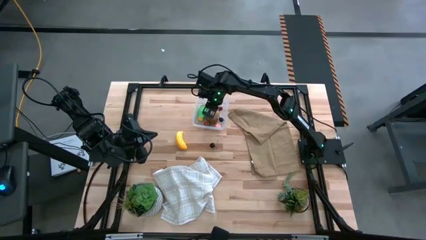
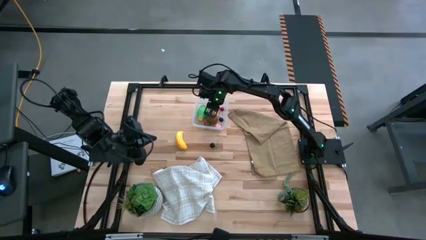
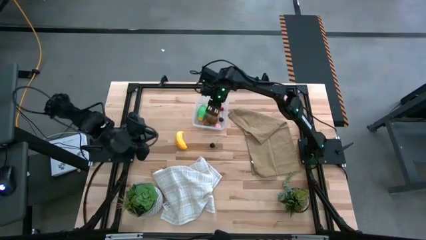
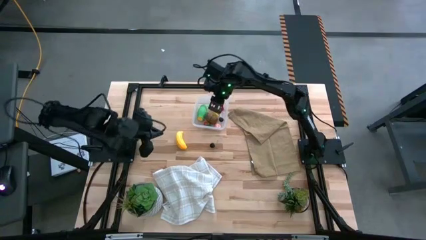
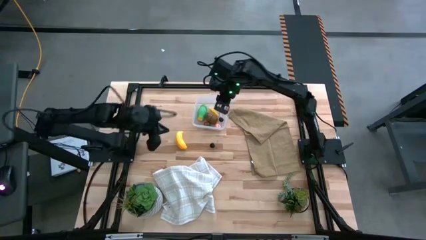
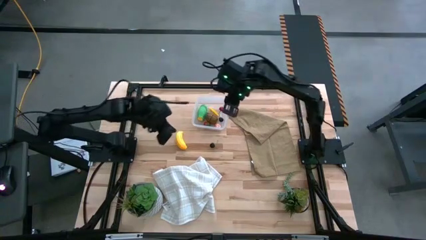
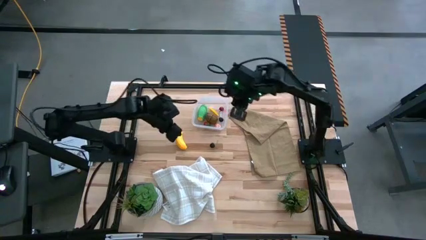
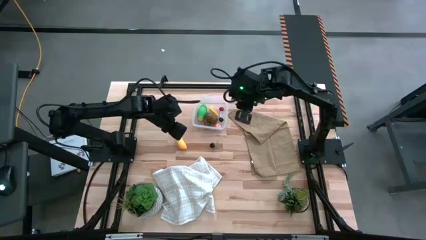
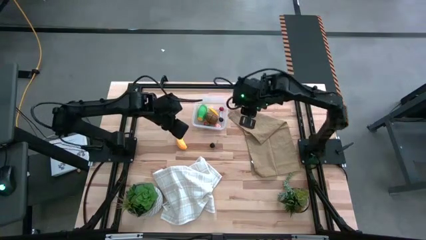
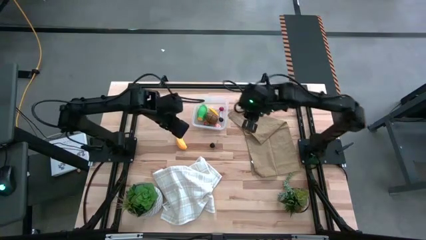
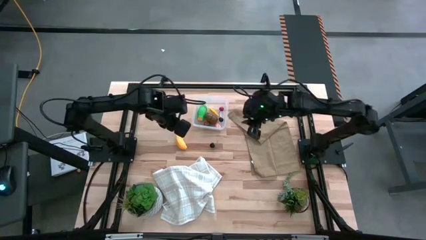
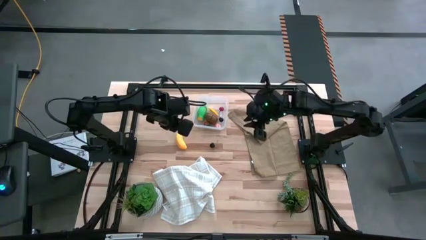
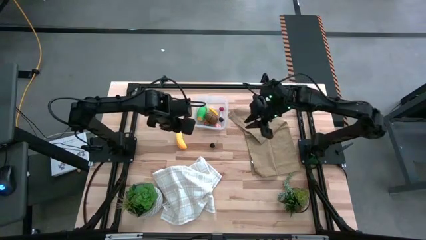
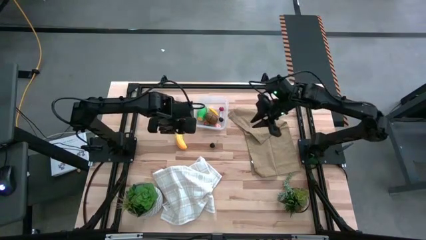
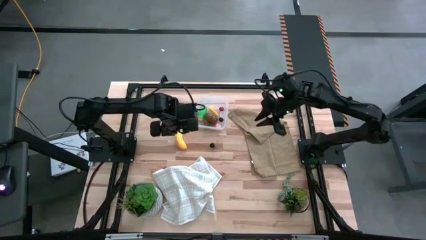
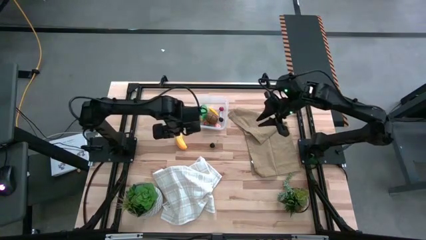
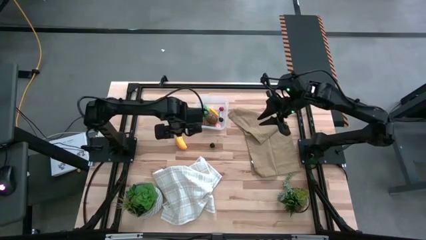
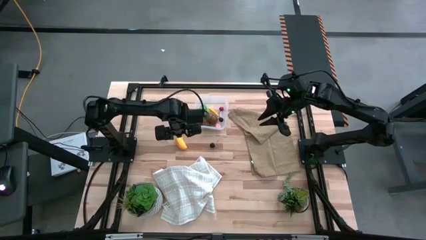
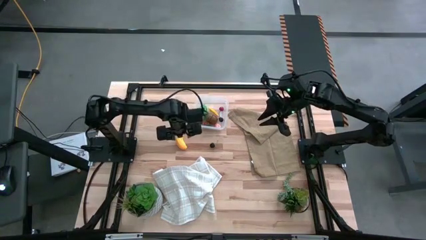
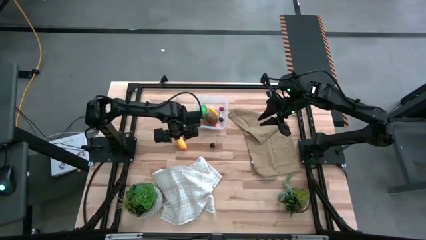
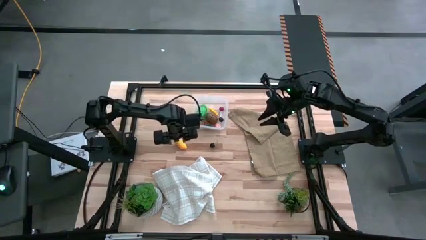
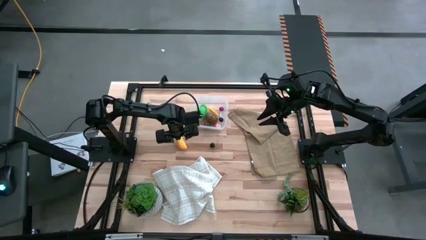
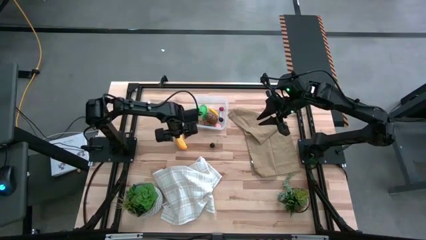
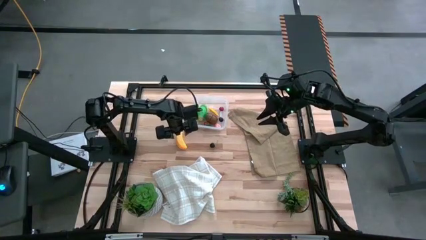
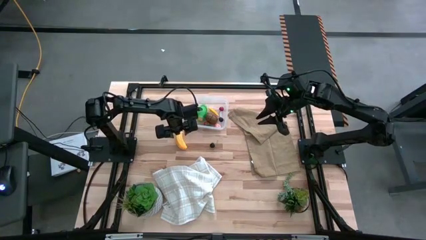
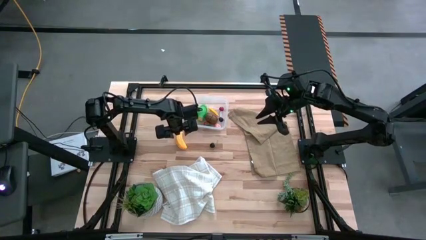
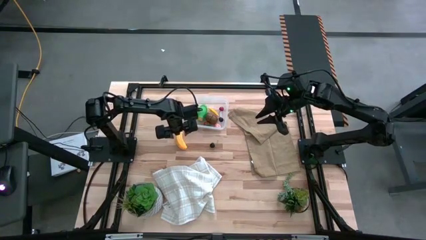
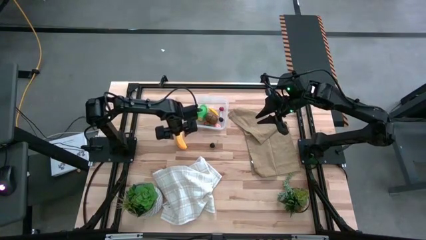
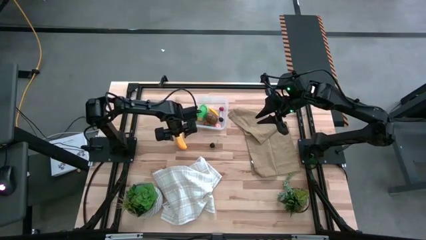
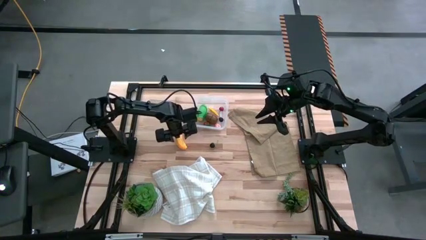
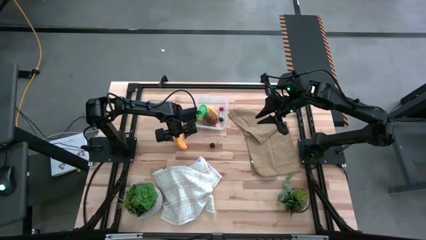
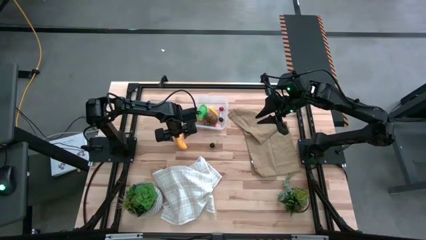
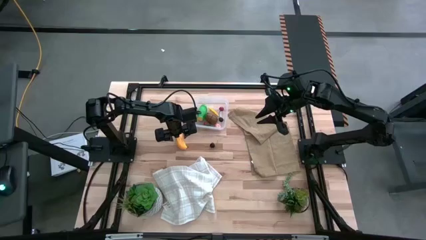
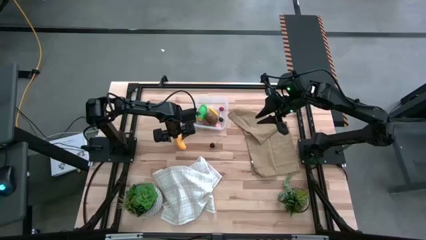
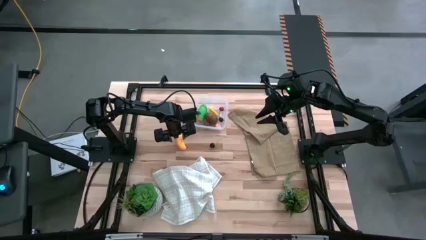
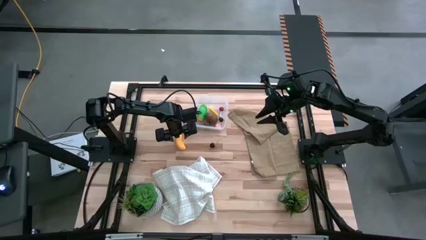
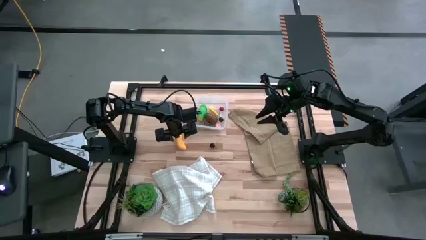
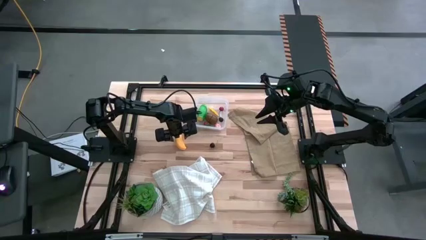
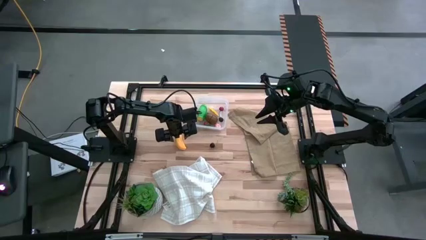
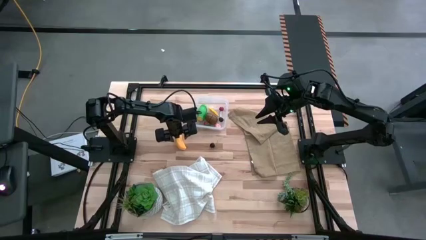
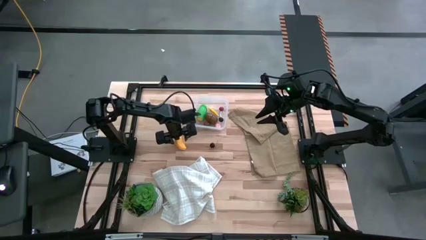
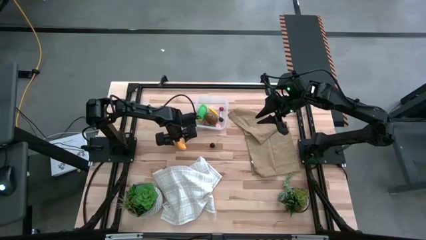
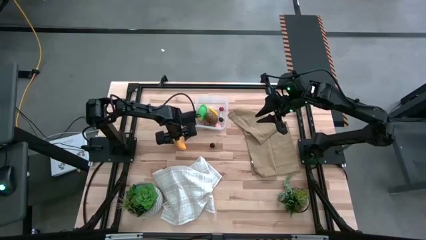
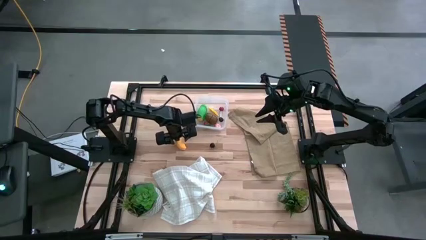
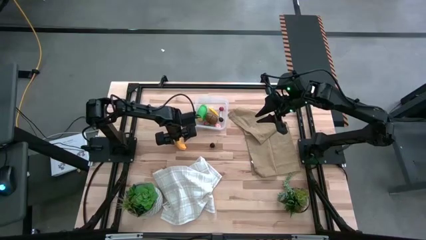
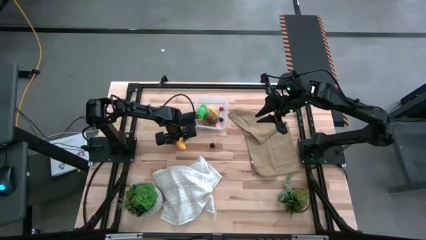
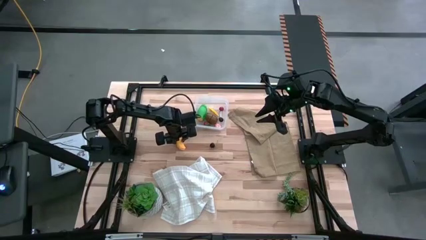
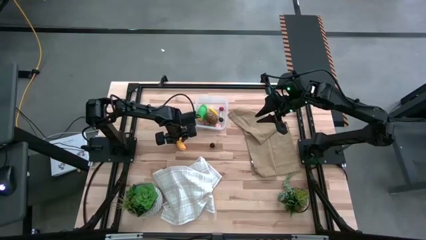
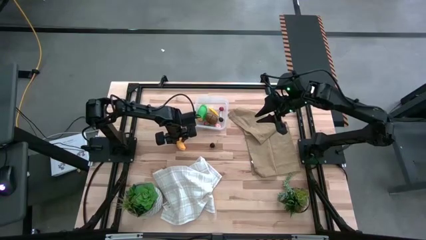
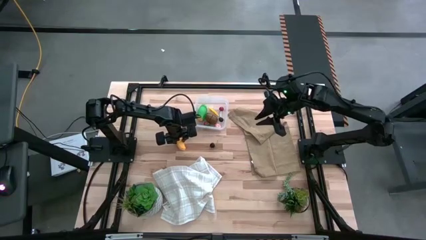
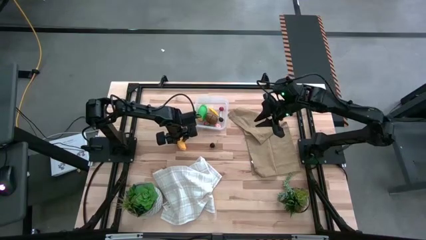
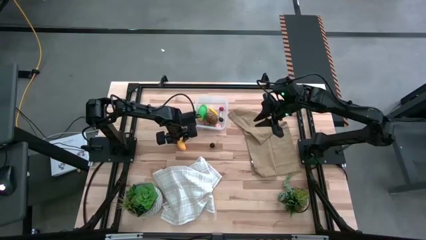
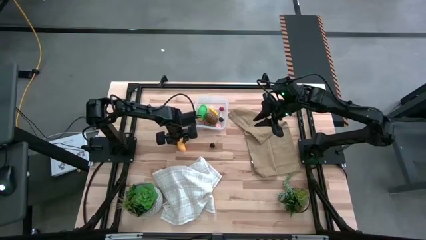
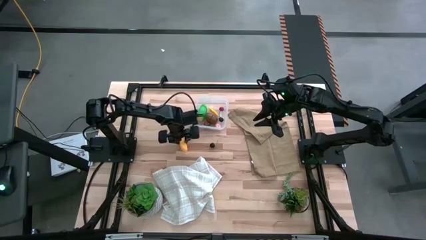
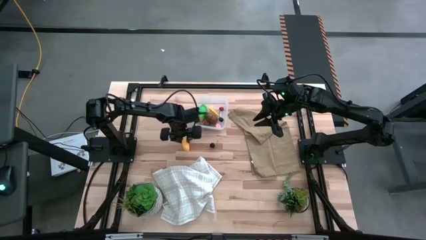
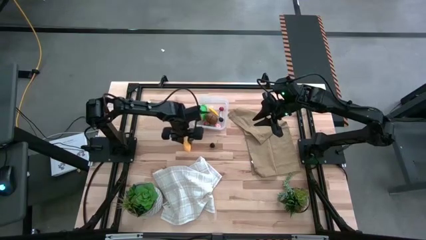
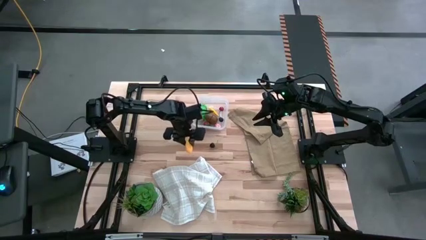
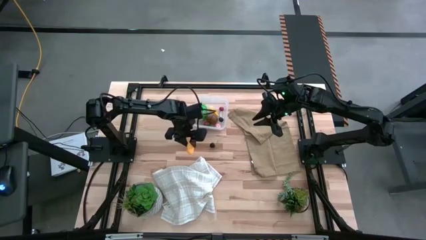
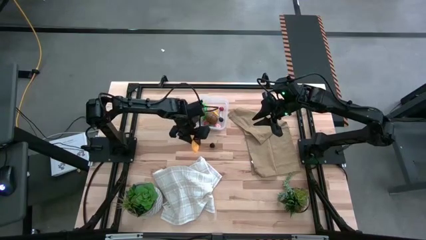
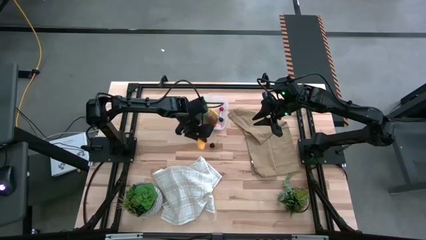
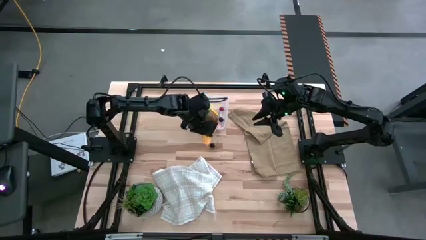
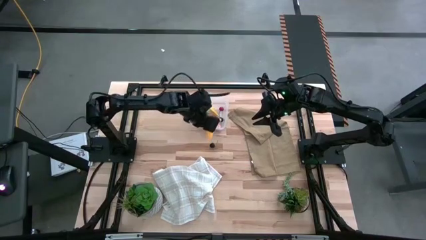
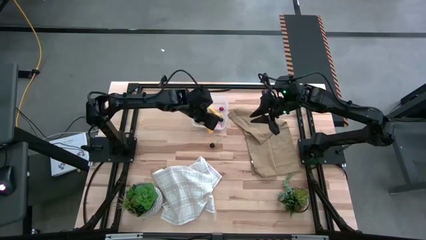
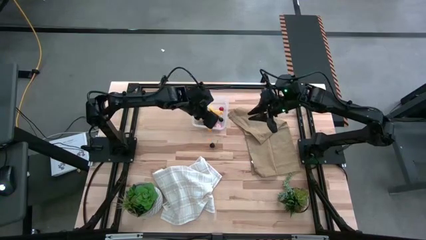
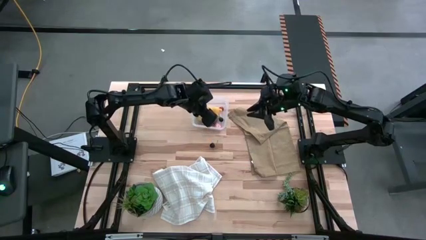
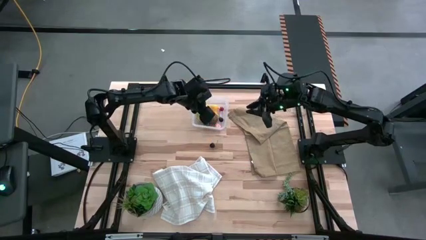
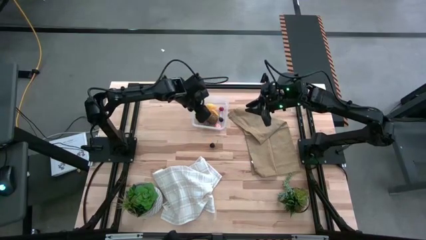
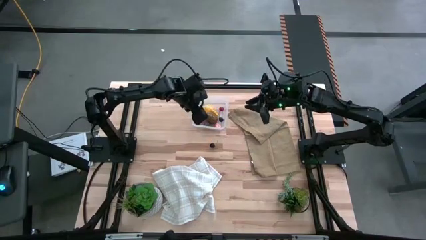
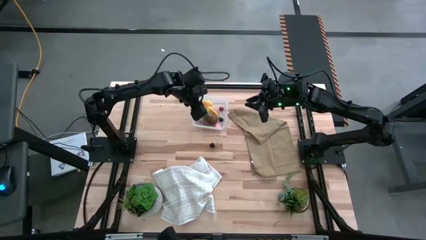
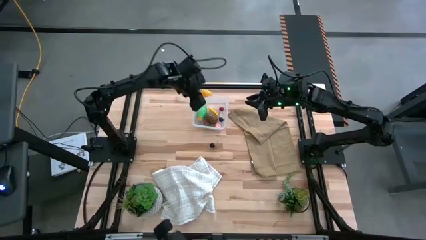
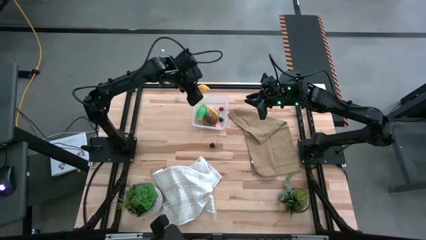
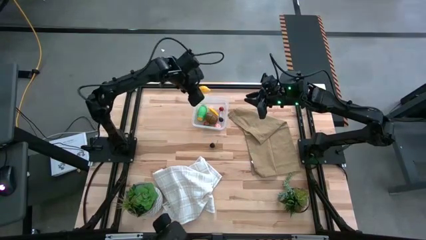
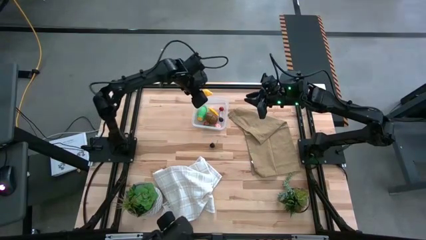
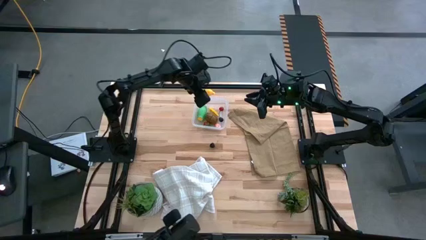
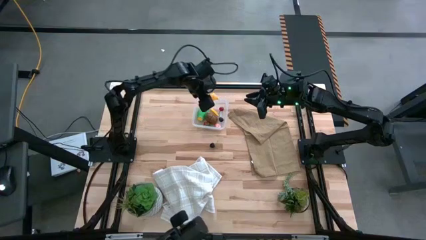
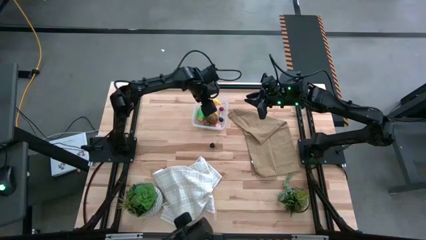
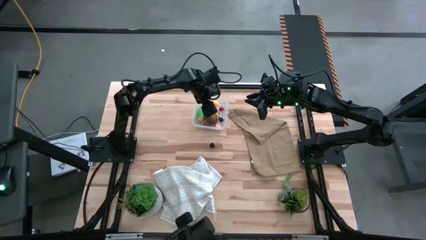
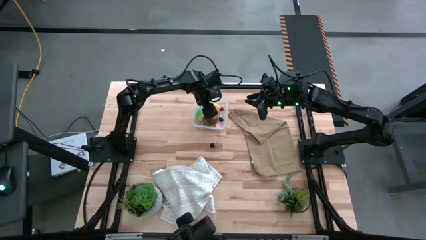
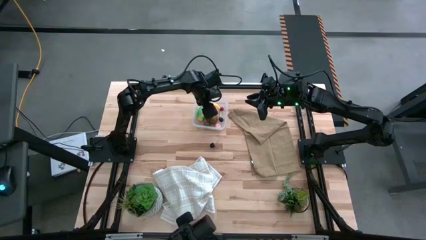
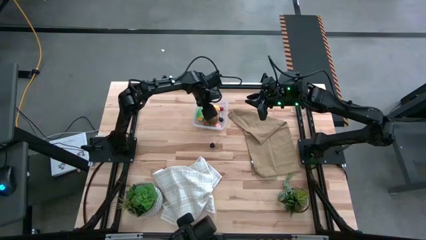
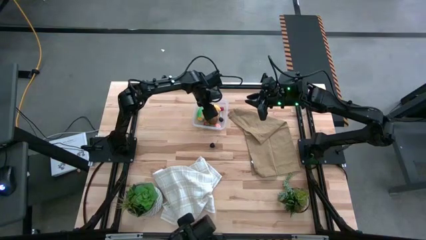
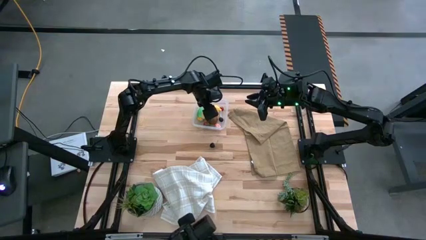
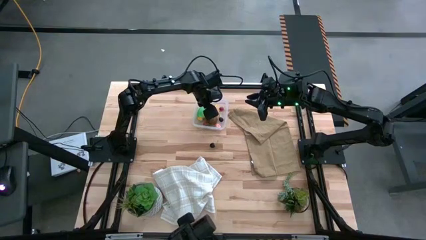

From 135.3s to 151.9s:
Task: Pick and placing Produce into tupperware
Put the yellow banana into the transparent bin
